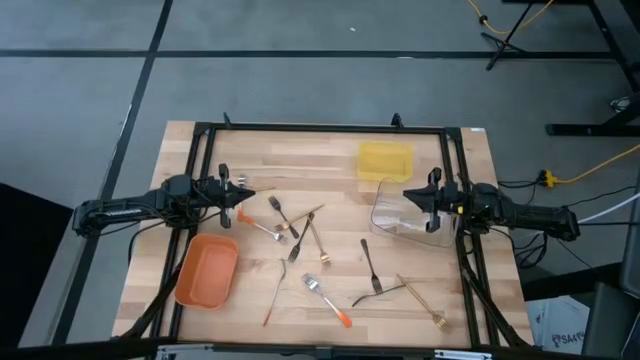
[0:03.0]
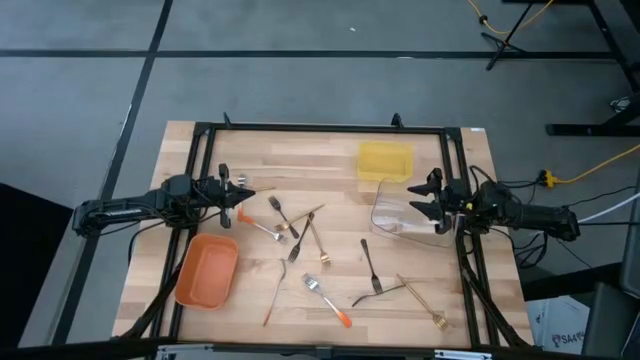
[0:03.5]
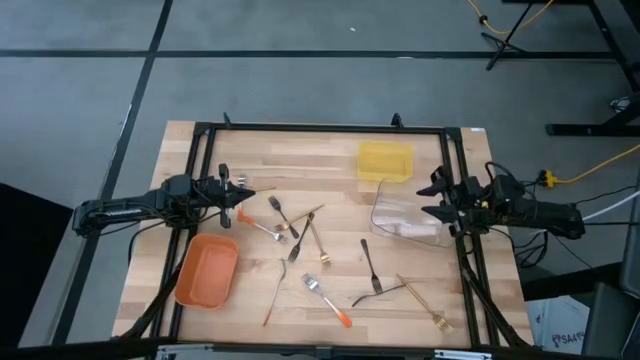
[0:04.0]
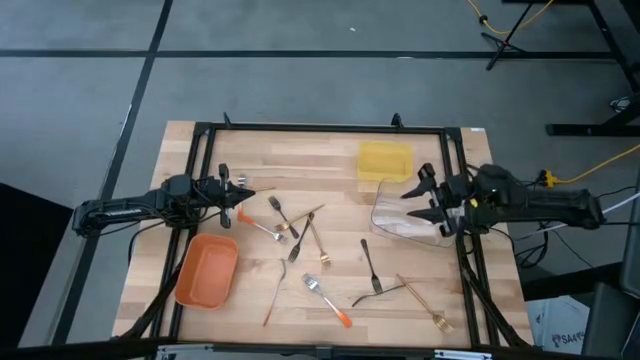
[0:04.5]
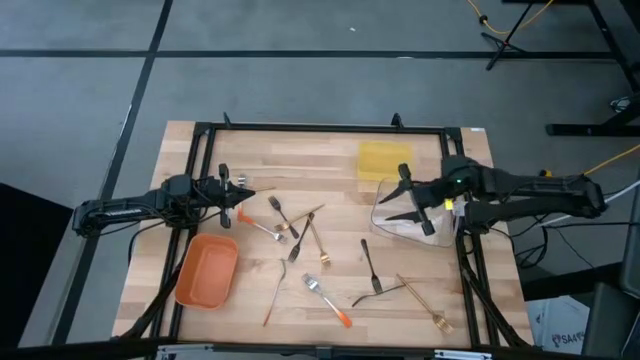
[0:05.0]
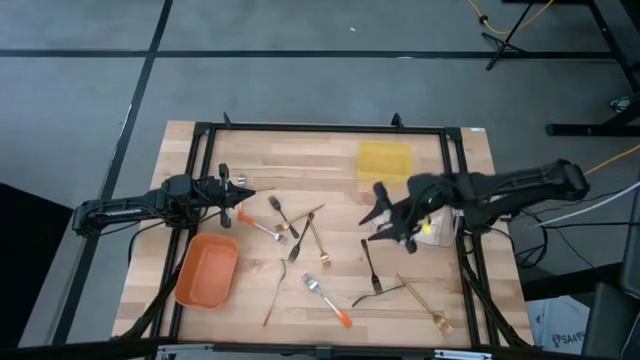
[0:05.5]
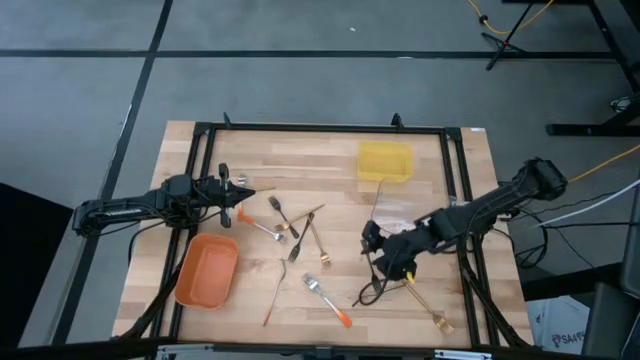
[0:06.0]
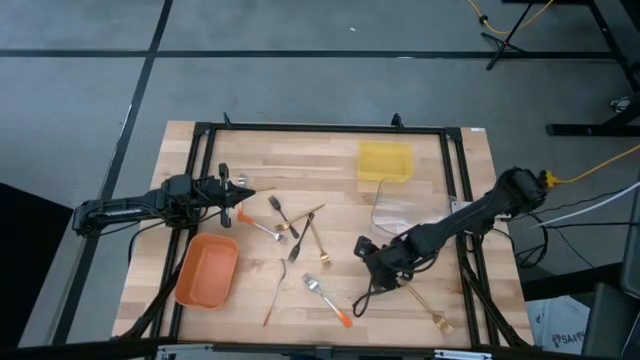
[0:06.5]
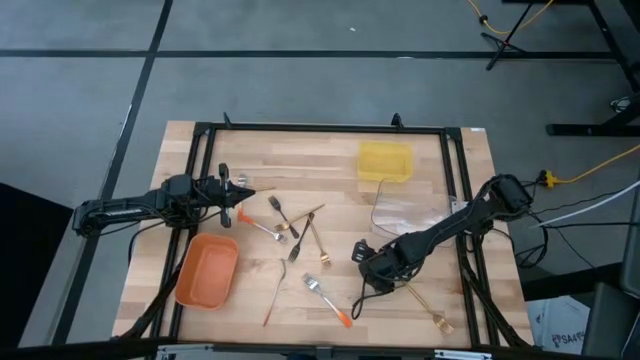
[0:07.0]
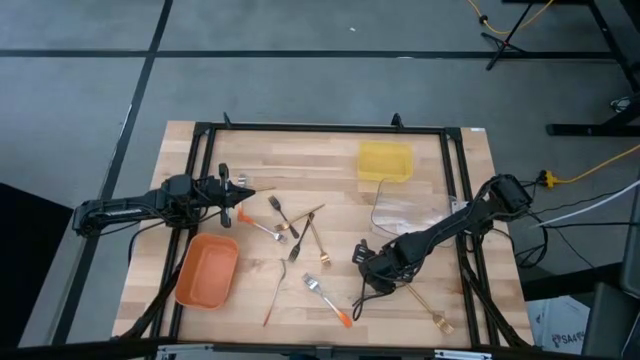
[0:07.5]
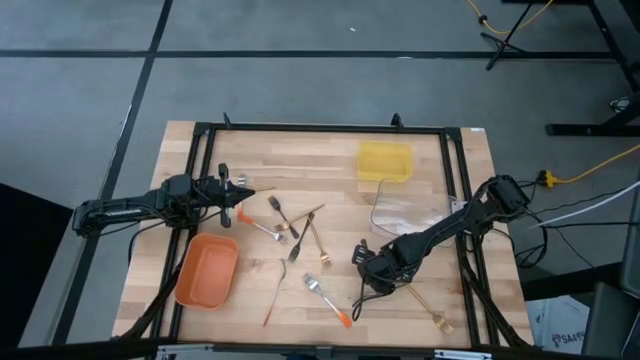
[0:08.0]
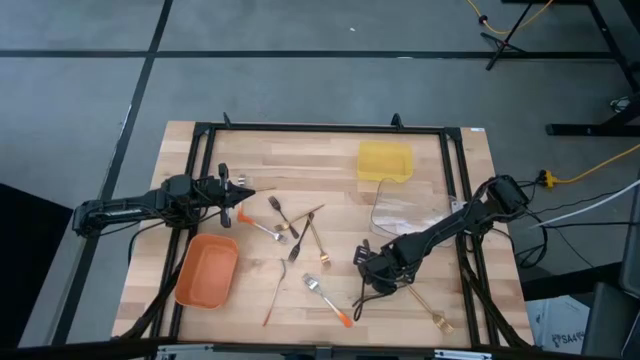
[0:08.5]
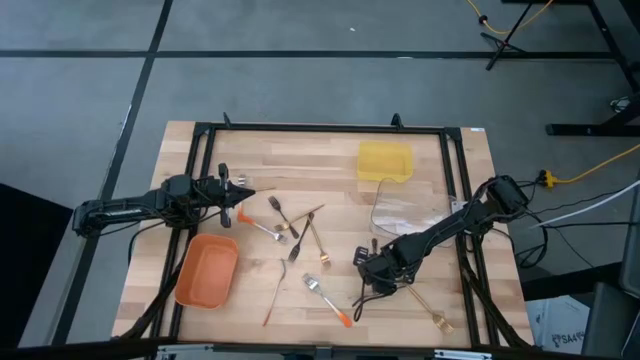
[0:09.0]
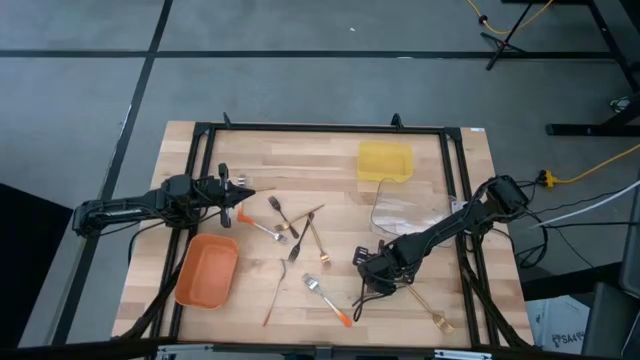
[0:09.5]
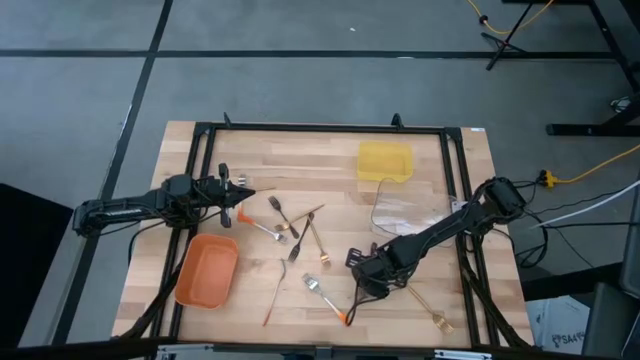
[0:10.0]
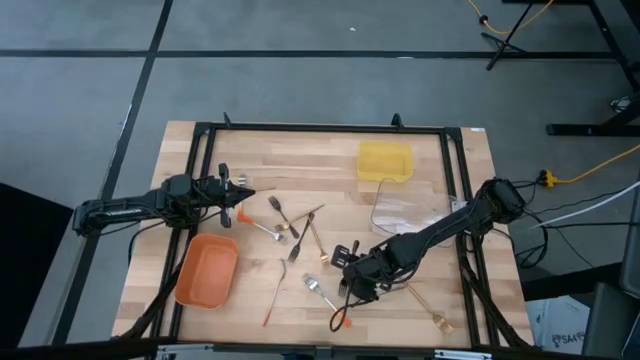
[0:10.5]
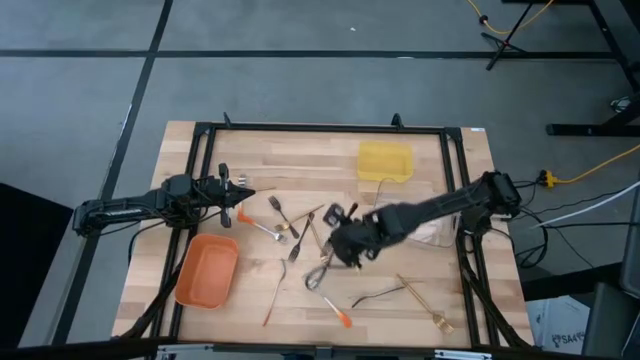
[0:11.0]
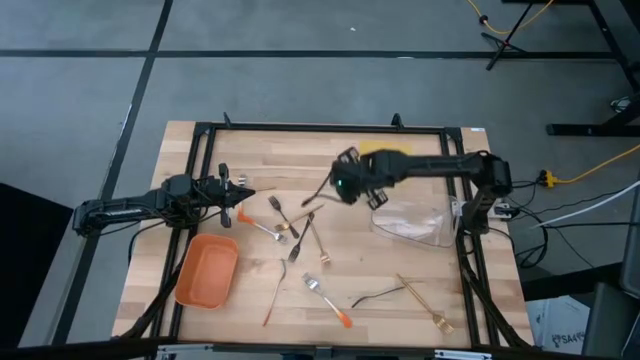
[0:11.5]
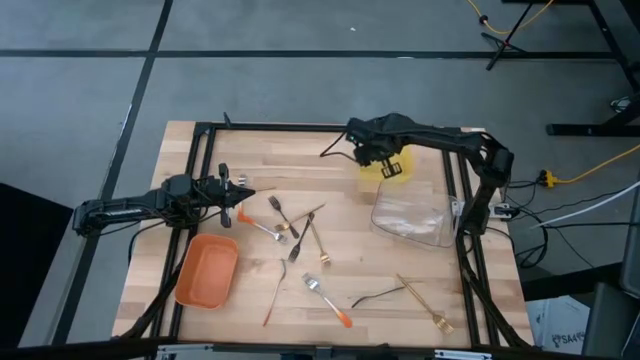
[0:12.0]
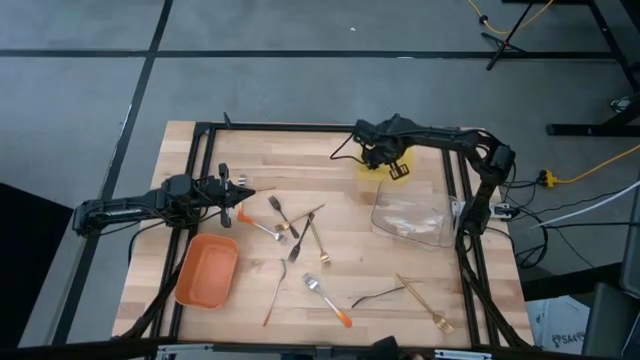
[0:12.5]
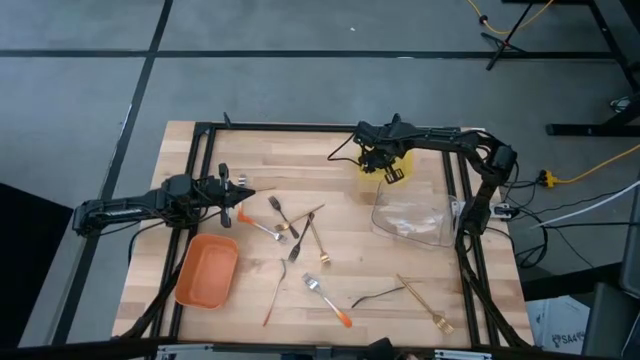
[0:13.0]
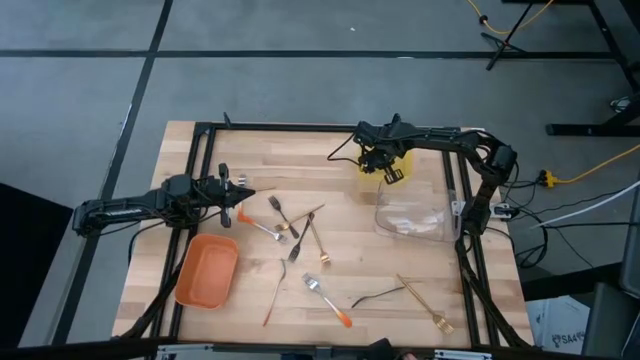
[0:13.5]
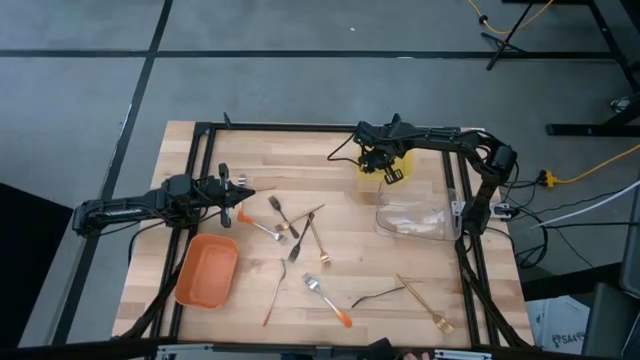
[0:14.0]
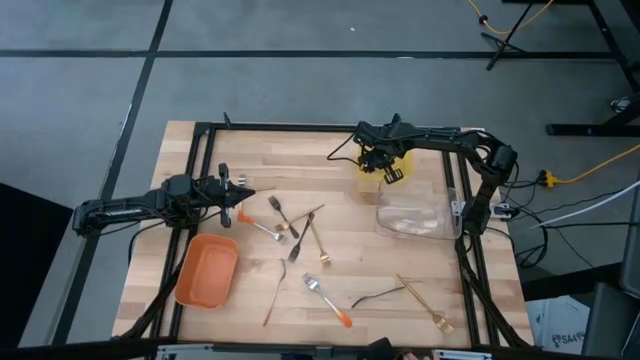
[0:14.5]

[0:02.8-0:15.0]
Task: Sort silverware by color (type)
Put the black fork into the yellow bin

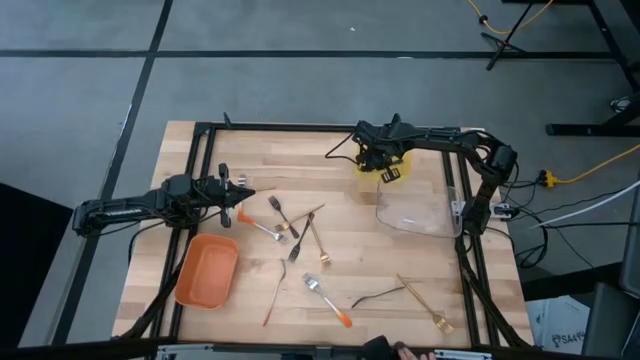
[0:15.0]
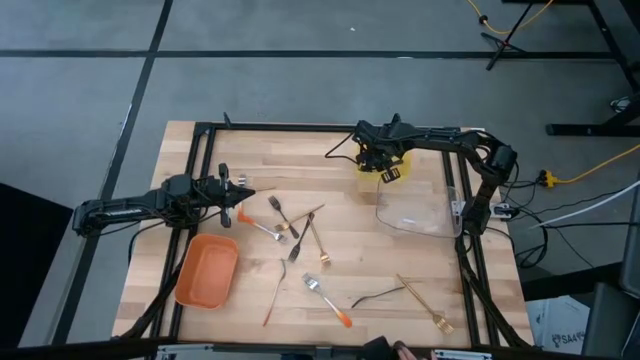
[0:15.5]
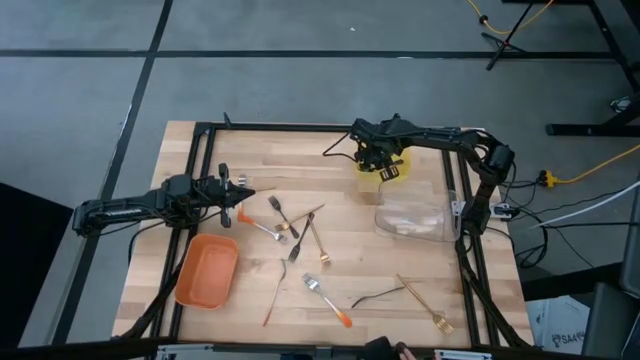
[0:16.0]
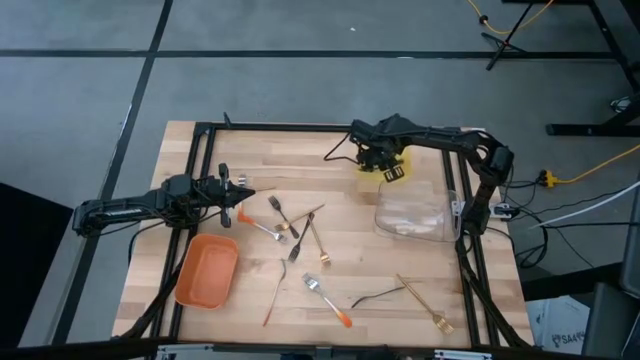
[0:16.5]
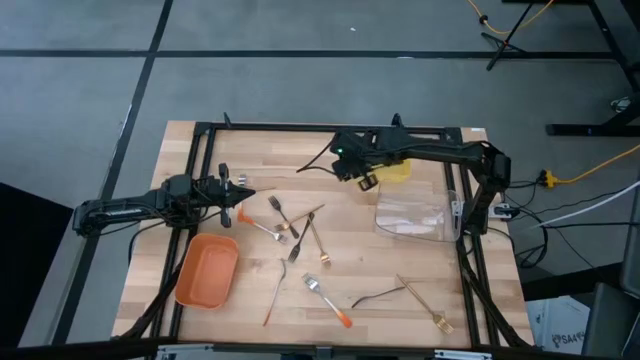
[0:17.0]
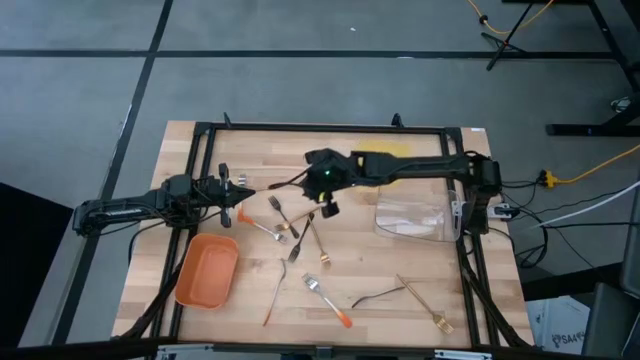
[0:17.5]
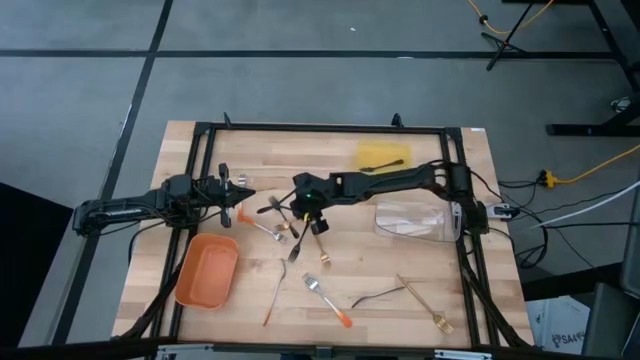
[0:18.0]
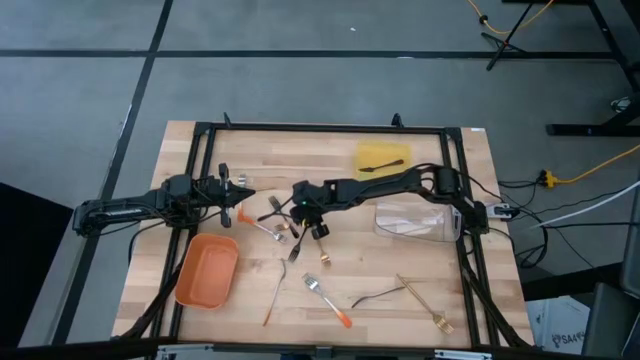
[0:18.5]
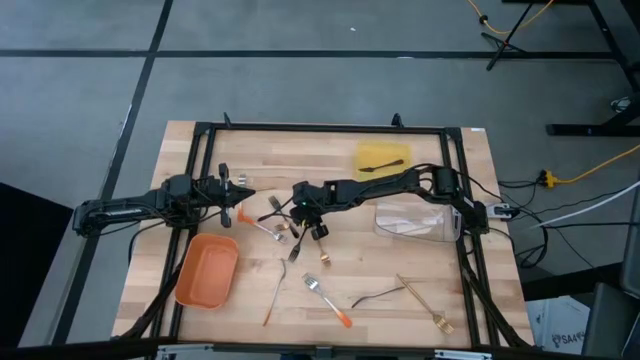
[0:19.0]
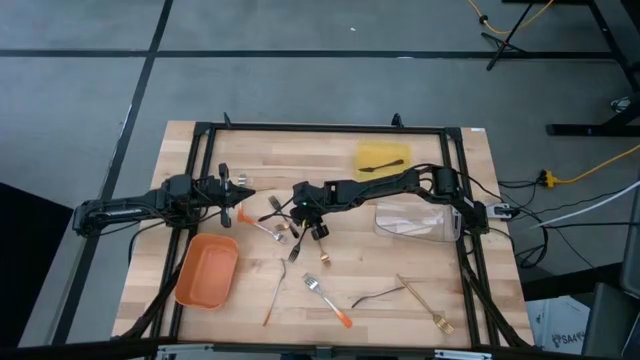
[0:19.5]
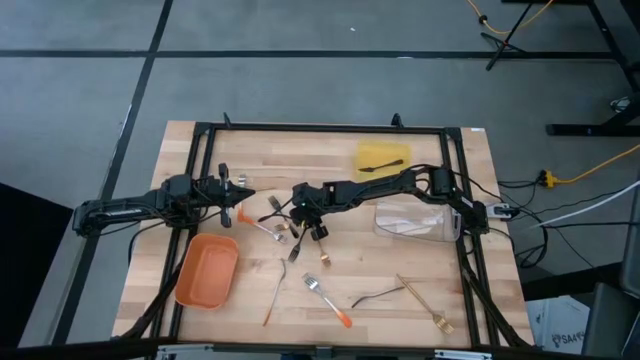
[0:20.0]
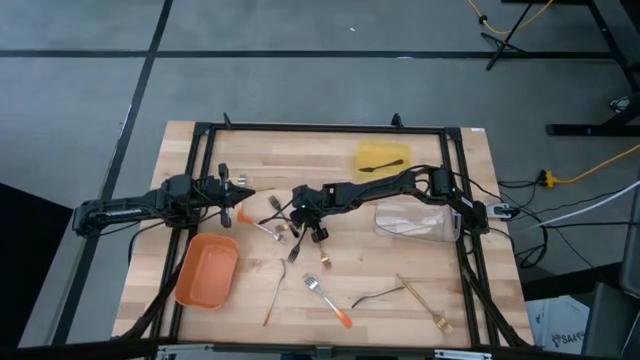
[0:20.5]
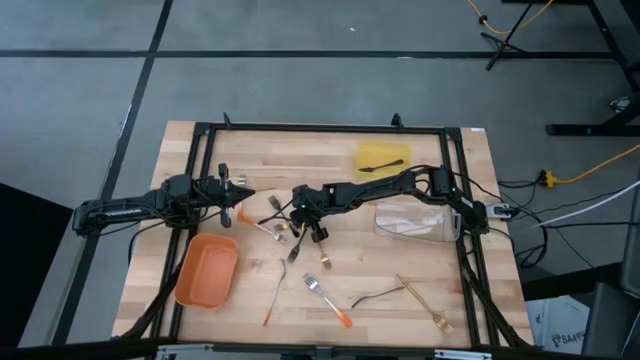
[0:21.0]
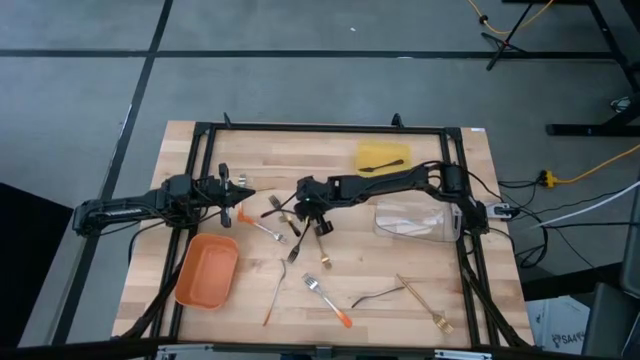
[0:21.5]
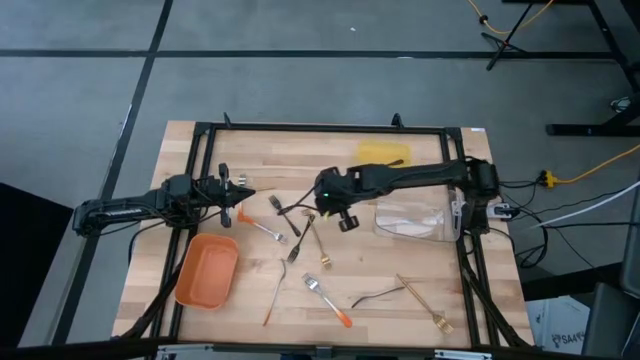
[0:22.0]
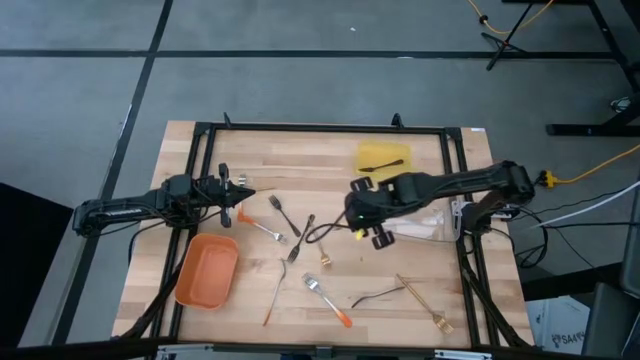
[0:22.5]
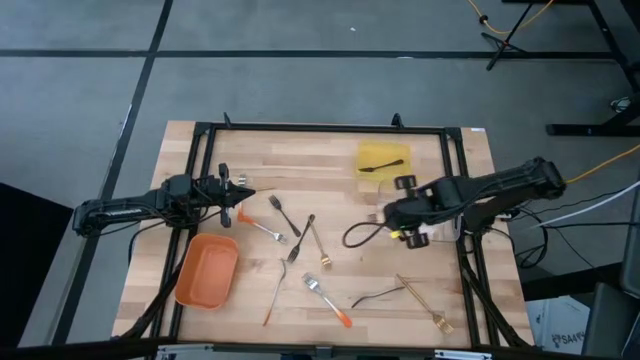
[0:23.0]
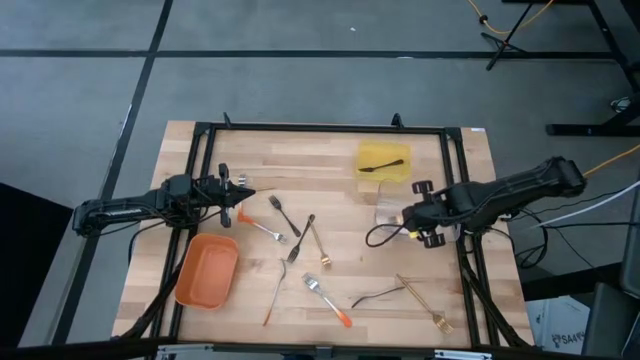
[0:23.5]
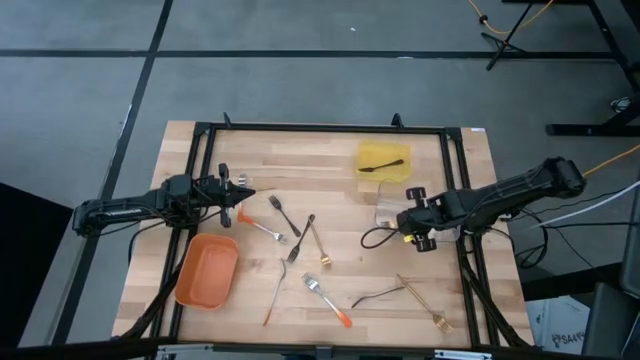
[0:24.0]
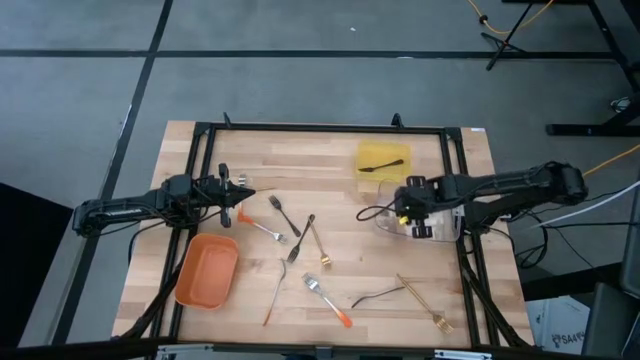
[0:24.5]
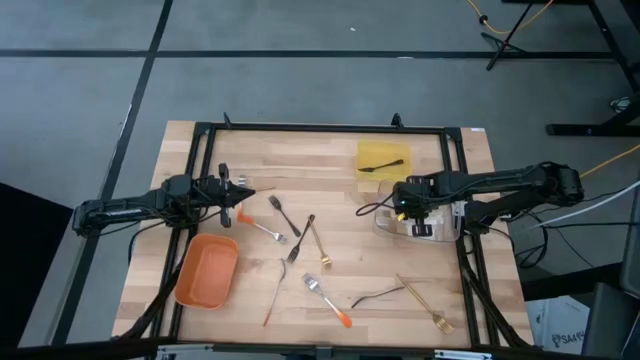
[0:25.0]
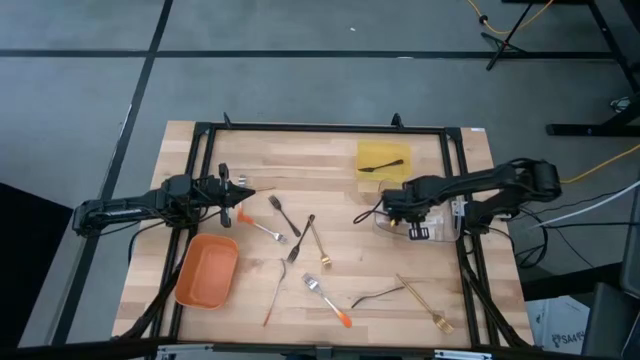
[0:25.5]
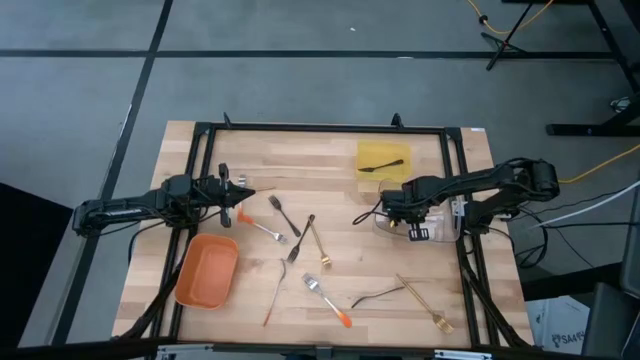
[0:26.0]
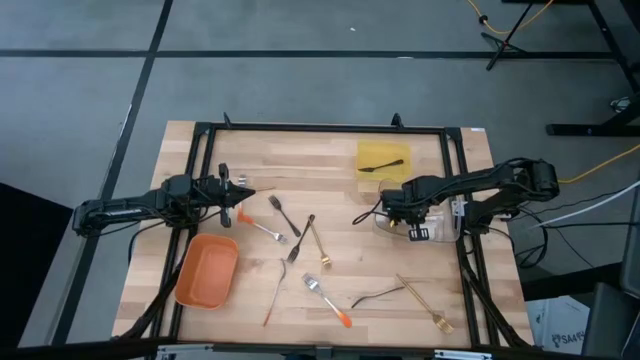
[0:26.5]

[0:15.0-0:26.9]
Put the gold fork into the transparent bin
